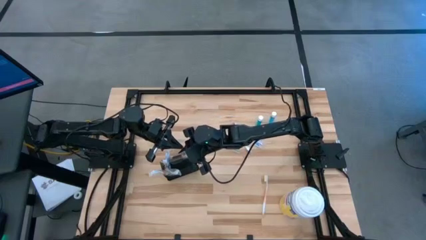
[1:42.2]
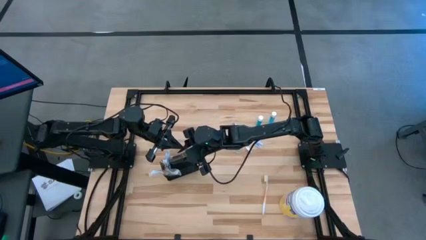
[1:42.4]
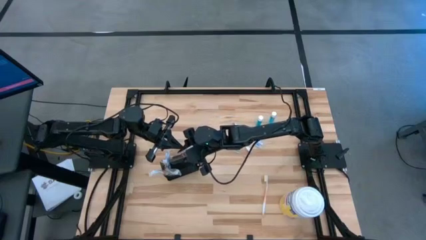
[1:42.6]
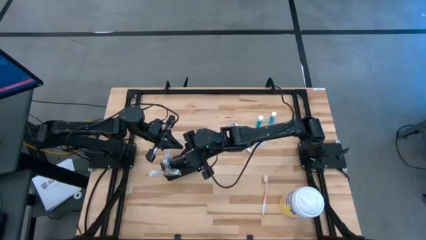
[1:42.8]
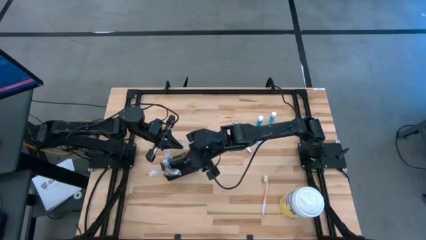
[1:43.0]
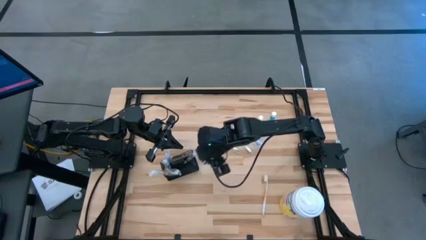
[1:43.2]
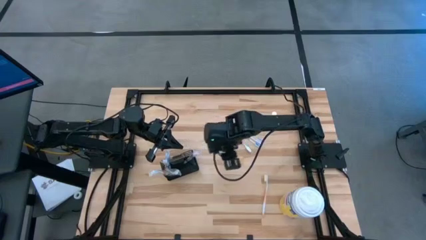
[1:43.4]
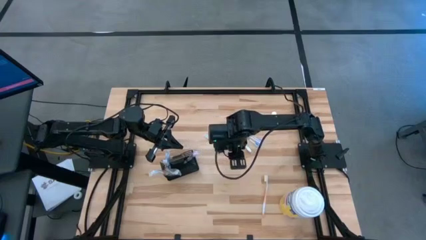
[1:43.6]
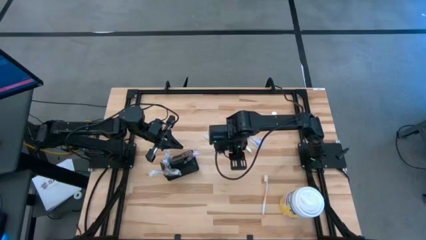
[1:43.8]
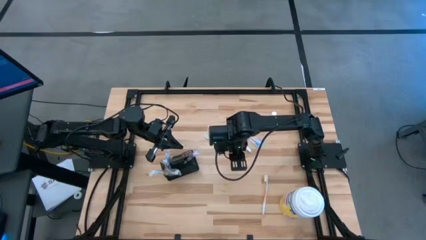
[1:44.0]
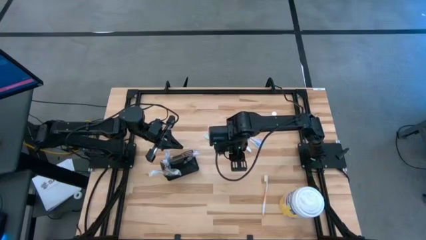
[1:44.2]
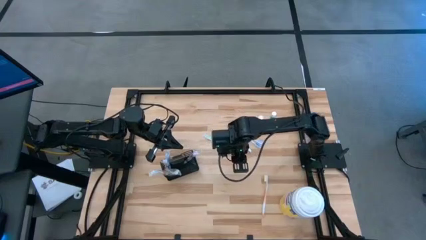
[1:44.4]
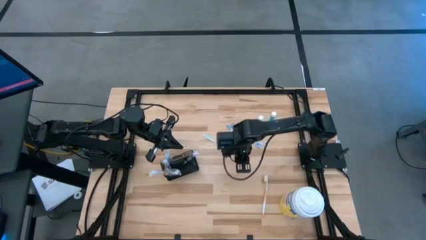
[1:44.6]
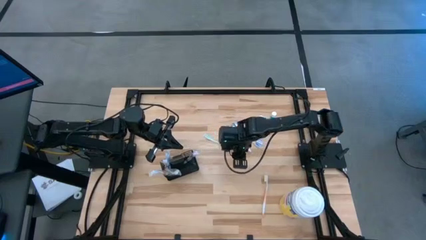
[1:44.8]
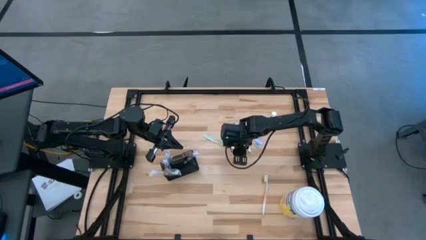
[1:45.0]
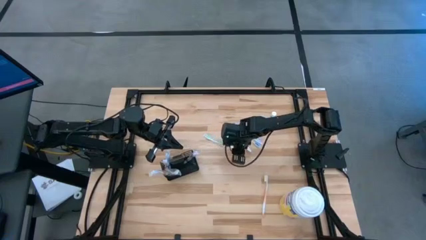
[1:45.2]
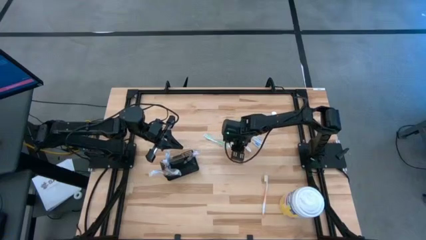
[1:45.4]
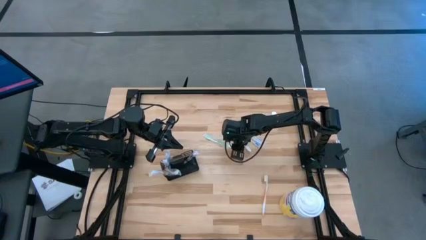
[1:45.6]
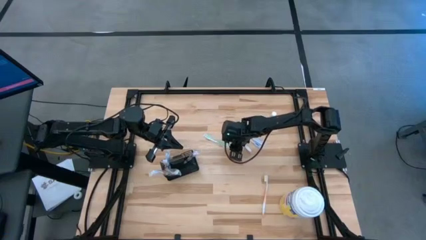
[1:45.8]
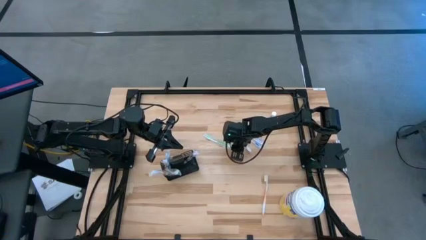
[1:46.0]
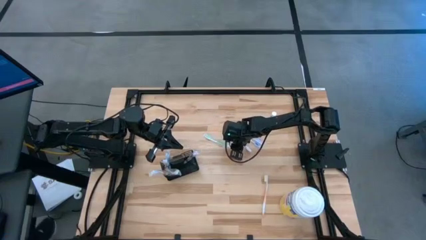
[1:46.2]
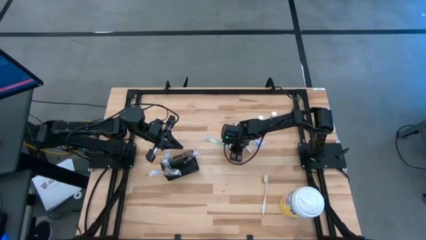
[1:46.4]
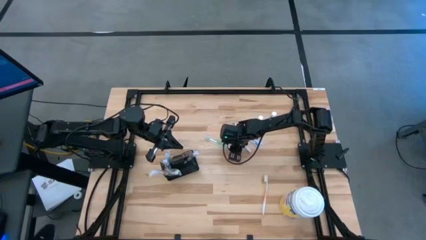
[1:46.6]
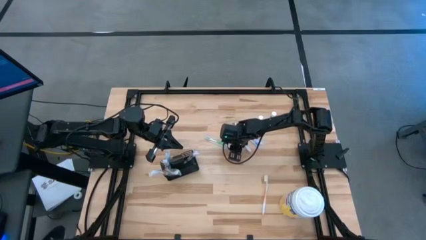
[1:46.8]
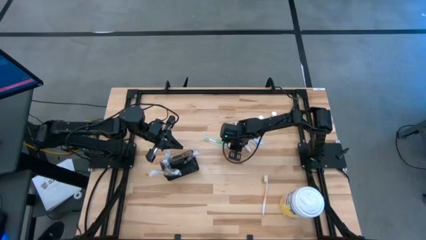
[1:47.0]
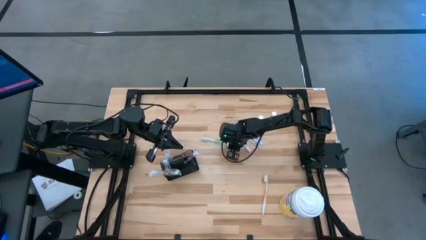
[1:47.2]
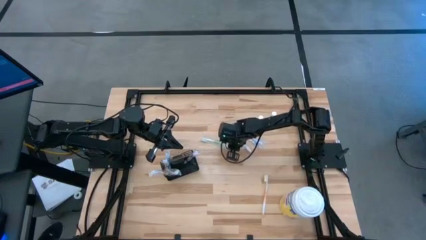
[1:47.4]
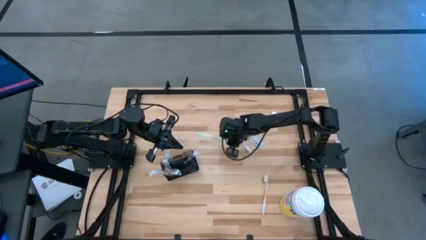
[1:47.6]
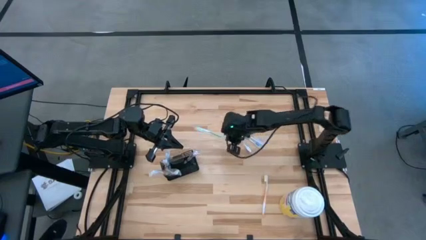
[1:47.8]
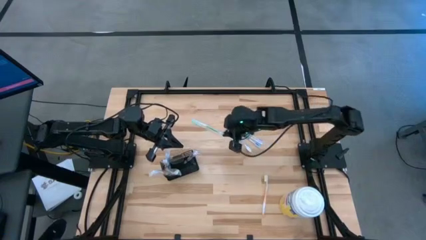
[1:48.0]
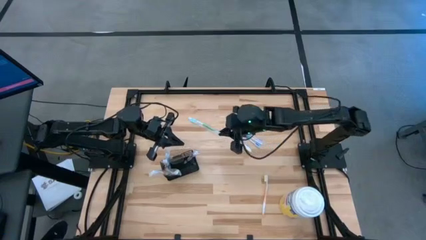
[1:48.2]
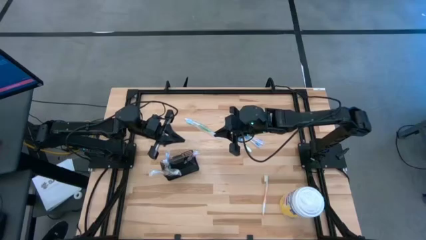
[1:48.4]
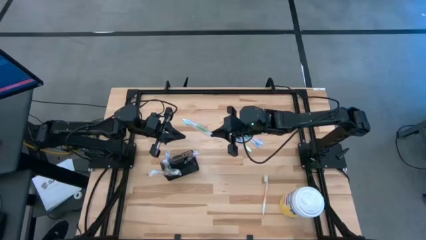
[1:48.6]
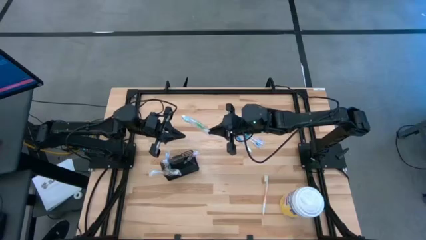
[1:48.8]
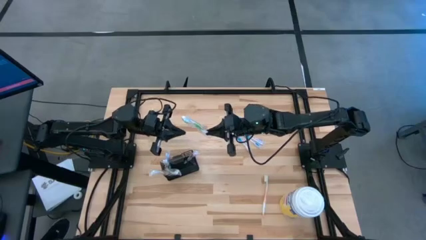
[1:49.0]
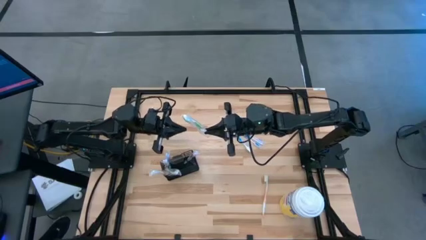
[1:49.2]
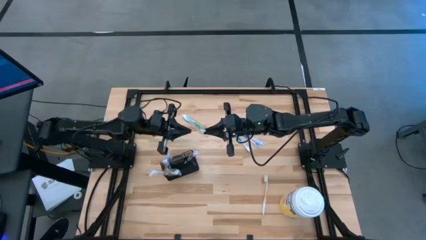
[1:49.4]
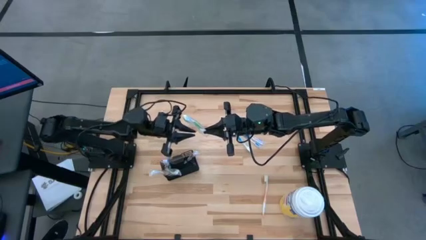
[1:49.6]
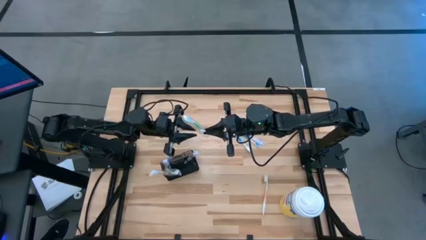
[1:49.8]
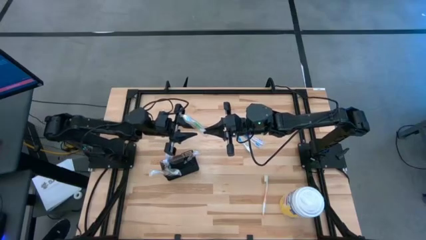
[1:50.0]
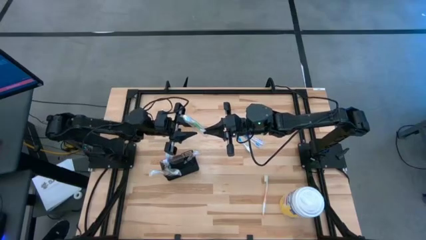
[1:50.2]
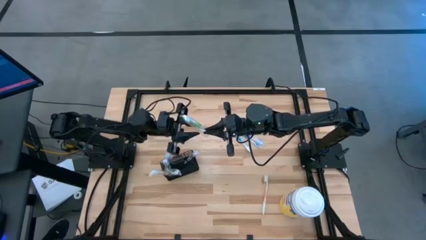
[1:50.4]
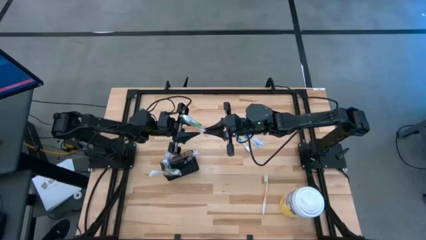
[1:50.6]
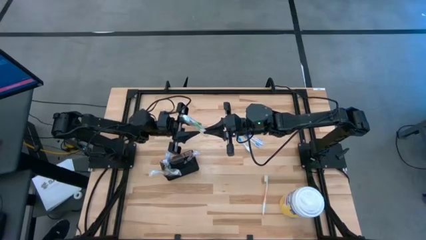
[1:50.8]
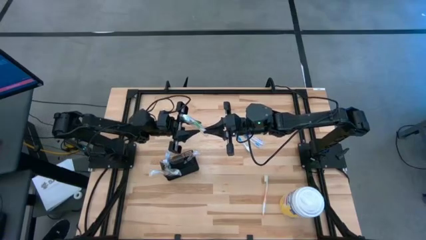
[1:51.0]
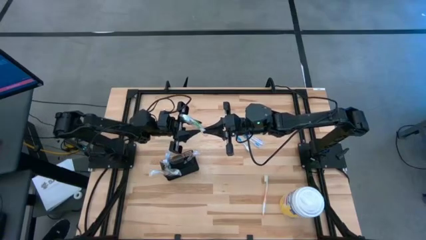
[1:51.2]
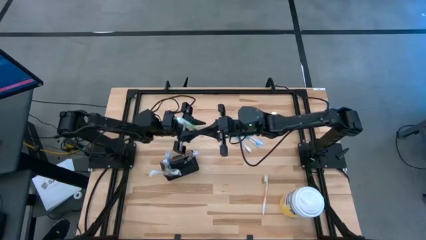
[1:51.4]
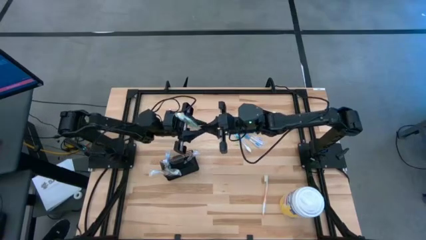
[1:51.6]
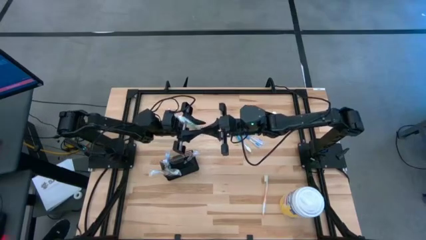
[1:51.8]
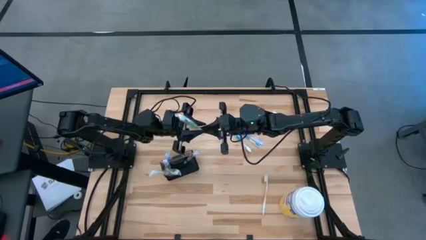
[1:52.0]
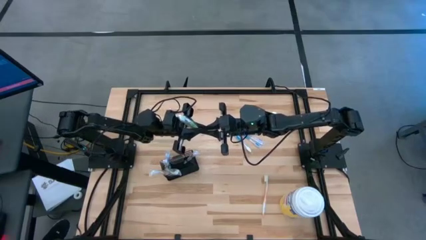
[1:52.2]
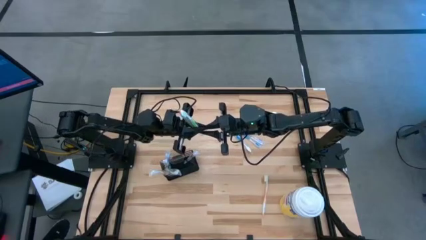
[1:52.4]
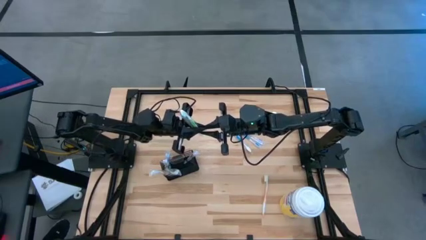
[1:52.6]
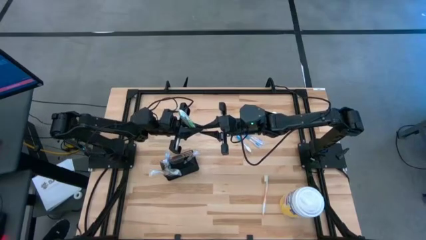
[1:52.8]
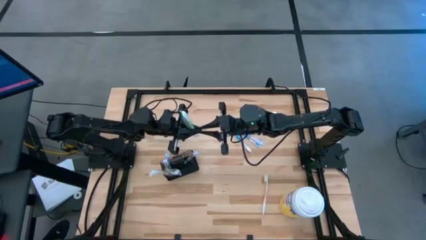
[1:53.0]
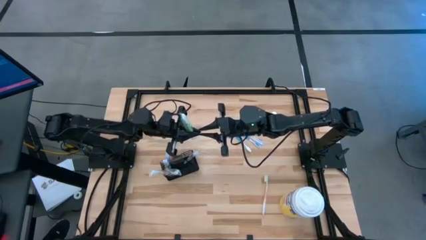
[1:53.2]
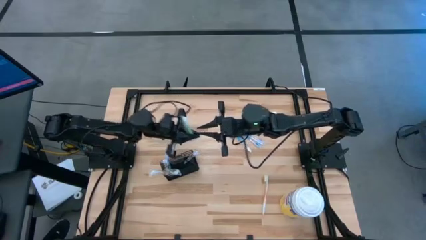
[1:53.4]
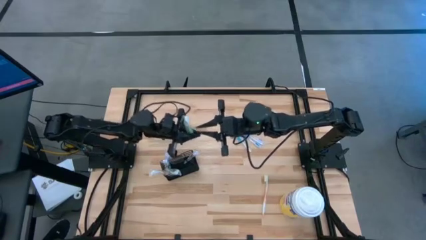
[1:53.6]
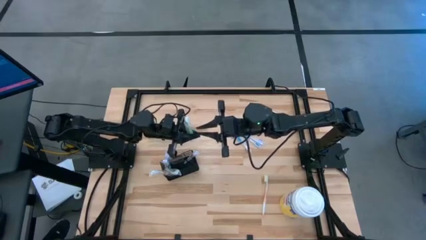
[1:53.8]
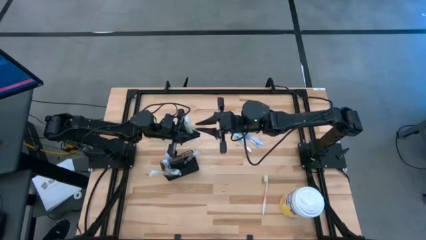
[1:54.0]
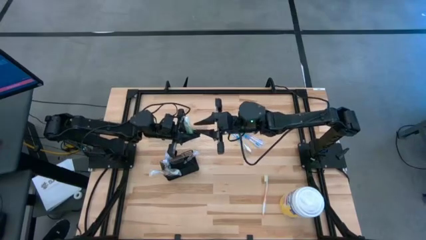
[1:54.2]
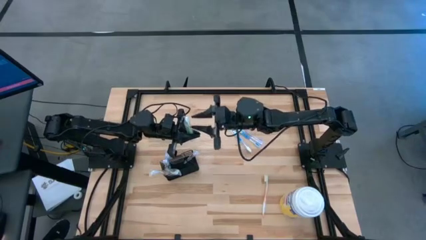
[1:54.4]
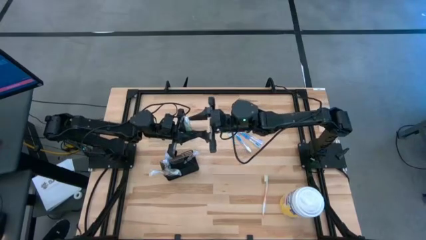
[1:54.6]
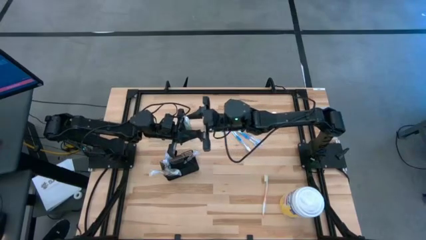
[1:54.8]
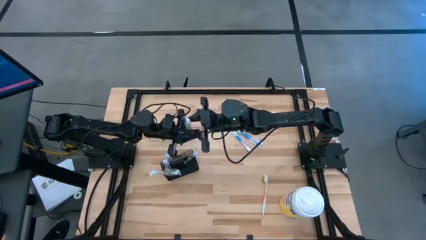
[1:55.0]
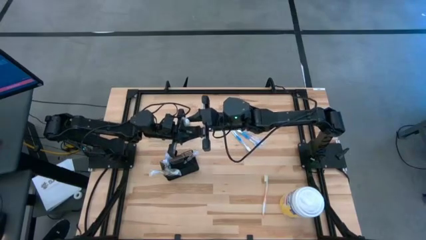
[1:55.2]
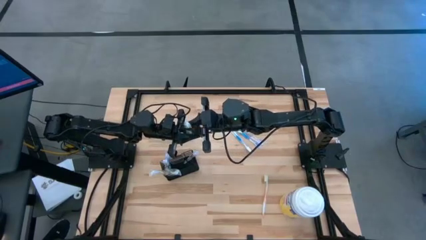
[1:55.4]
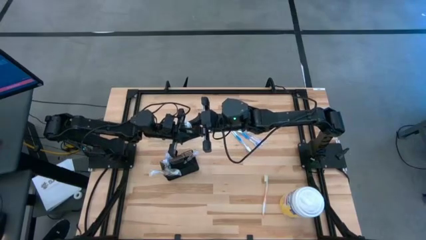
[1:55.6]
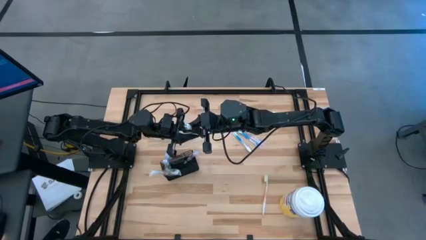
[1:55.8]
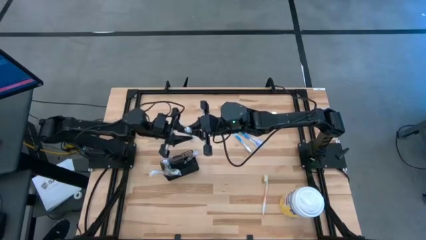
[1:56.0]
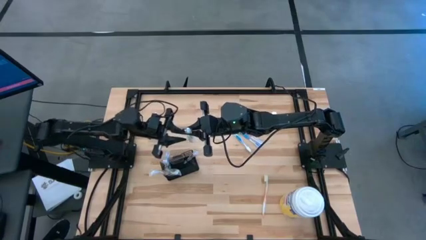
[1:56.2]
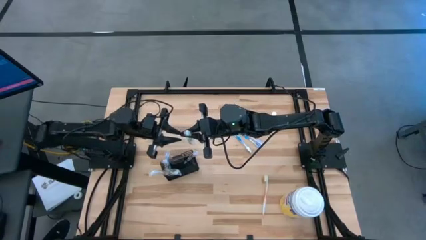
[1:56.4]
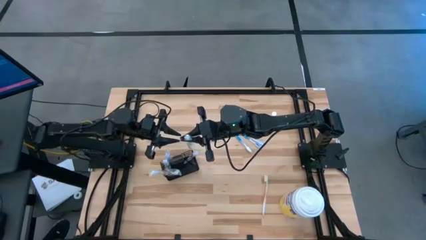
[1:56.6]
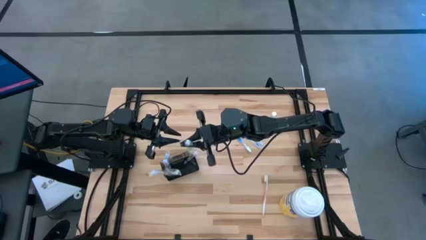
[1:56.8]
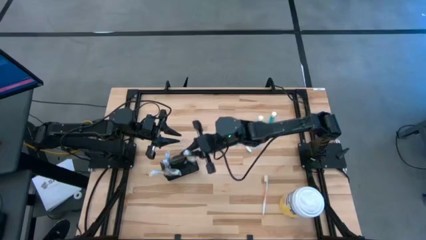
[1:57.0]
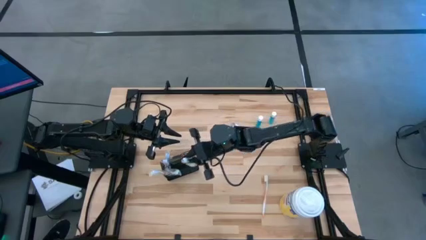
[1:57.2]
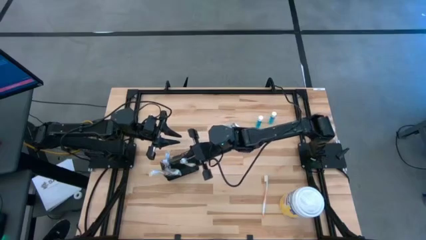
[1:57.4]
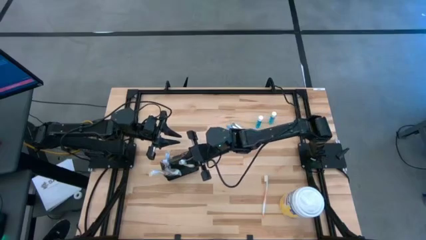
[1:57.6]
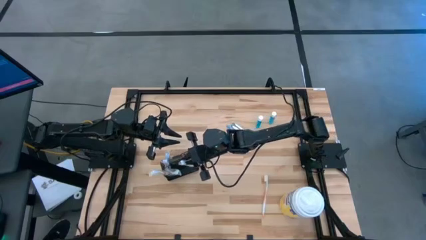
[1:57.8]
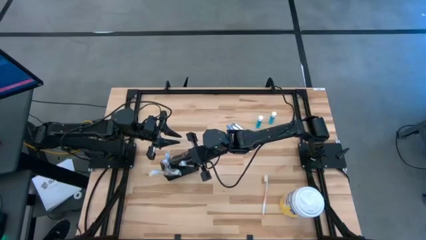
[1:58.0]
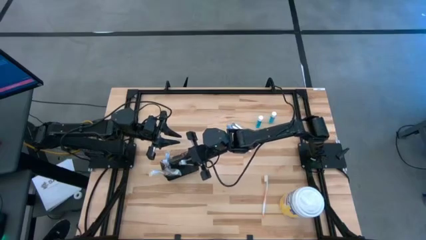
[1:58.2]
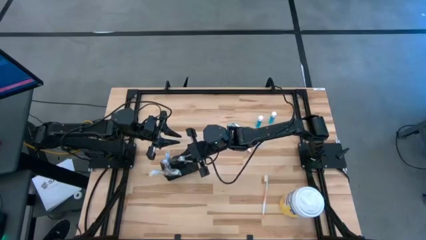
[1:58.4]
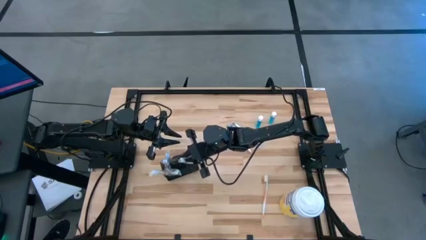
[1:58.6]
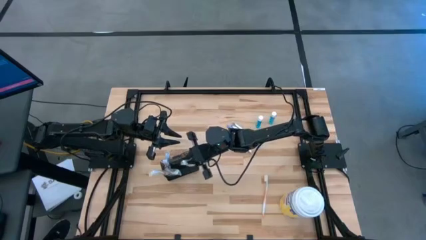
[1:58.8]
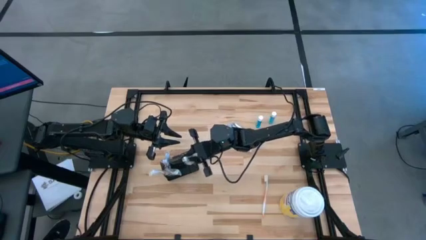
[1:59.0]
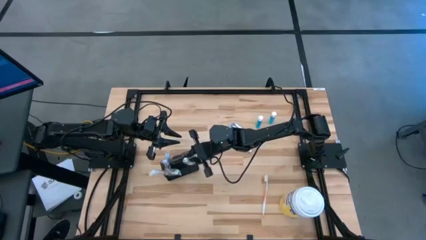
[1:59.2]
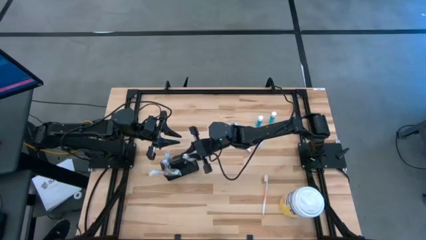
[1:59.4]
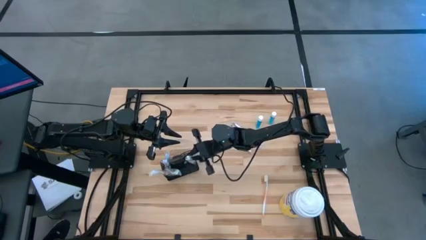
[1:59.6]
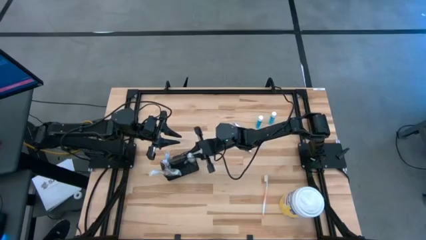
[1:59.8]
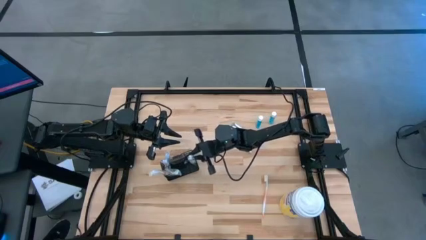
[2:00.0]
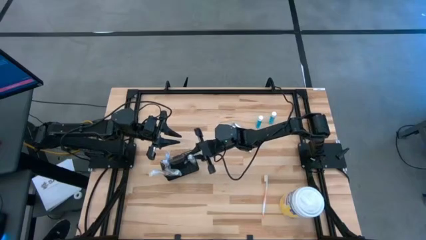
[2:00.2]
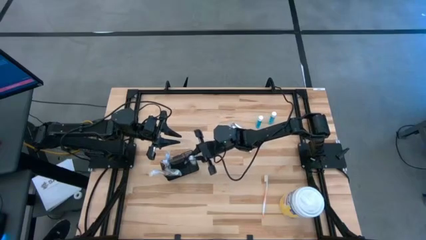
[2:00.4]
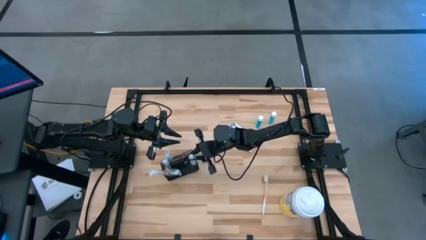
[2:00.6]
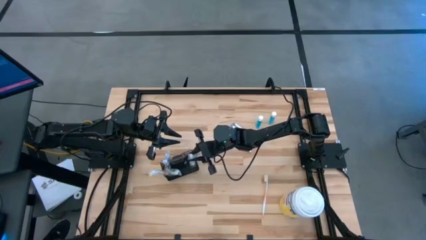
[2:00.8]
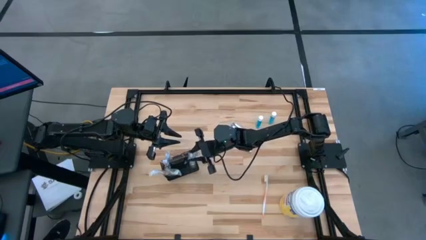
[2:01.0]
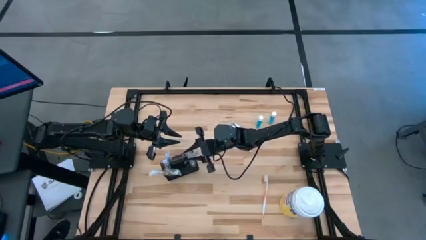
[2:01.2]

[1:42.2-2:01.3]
Task: Pick & Place toothbrushing station
Put the green toothbrush into the bottom right section of the mesh organizer
